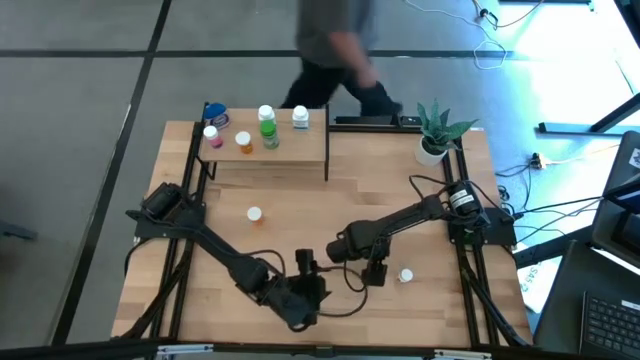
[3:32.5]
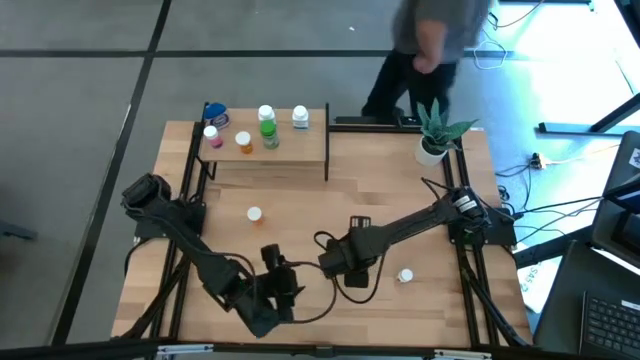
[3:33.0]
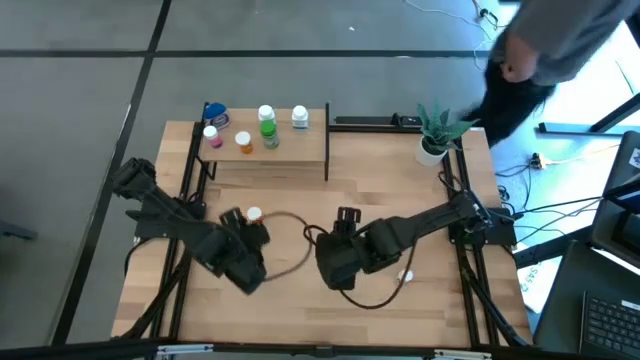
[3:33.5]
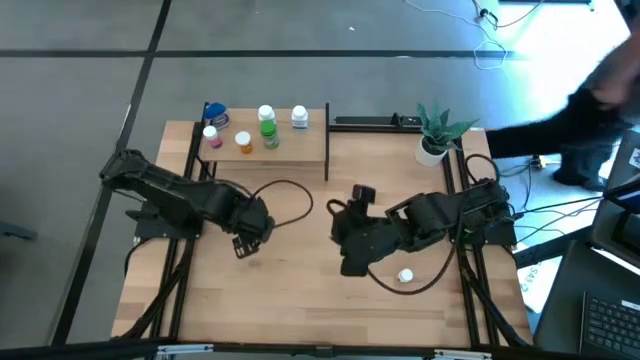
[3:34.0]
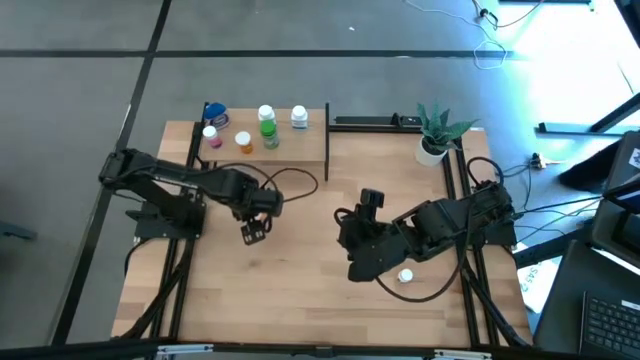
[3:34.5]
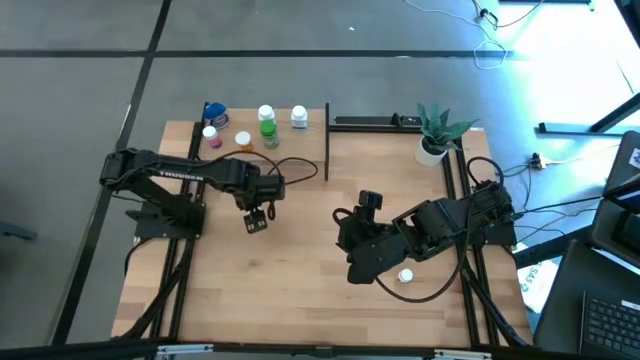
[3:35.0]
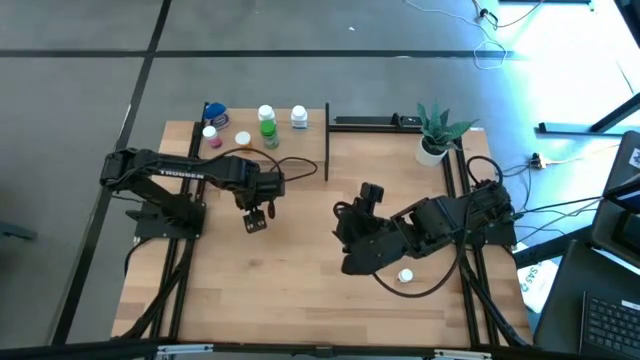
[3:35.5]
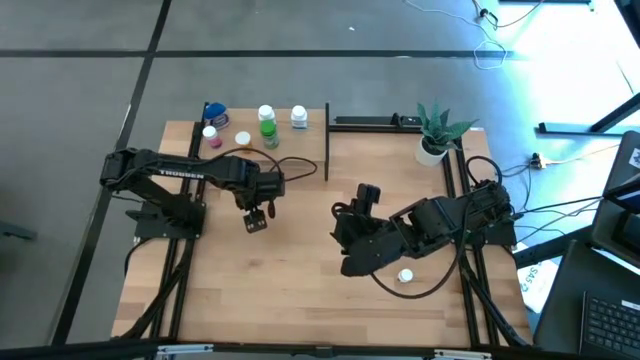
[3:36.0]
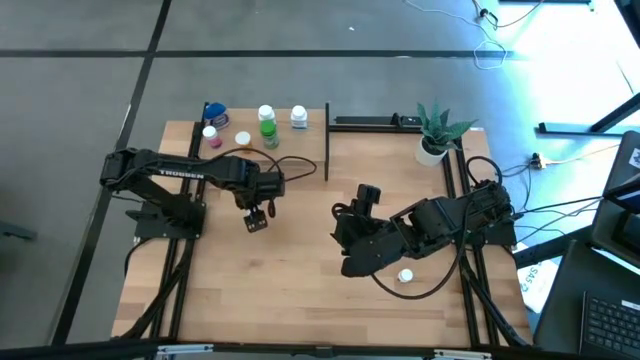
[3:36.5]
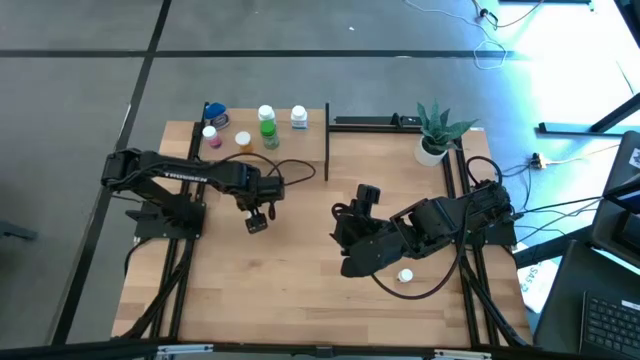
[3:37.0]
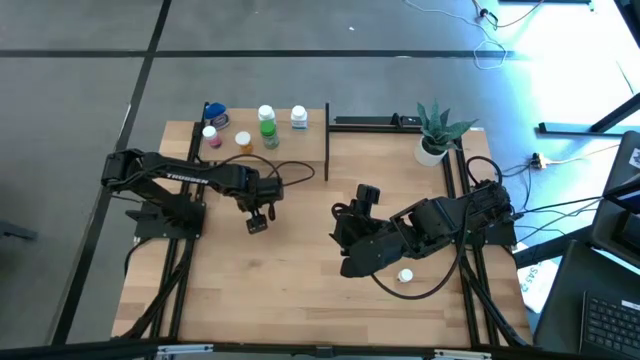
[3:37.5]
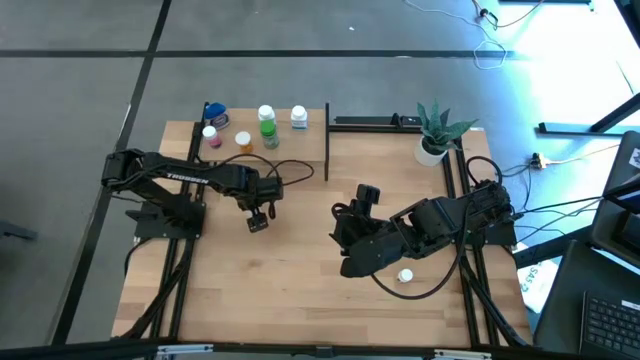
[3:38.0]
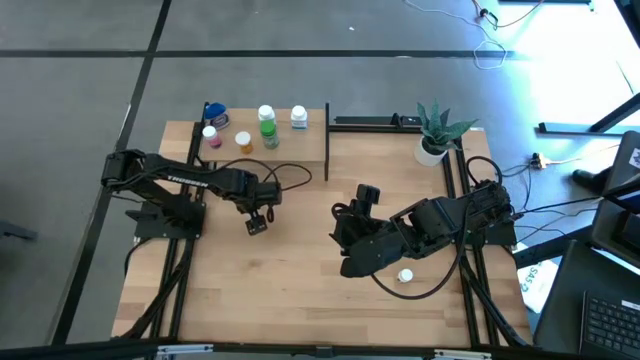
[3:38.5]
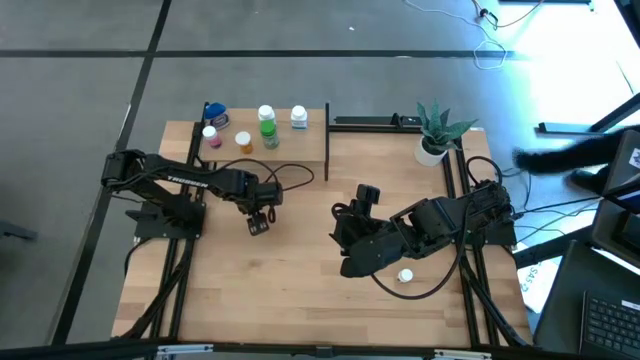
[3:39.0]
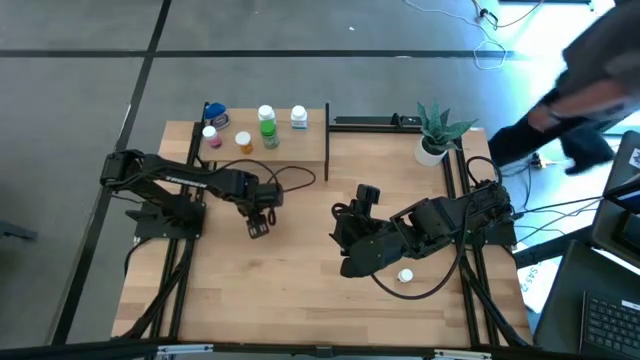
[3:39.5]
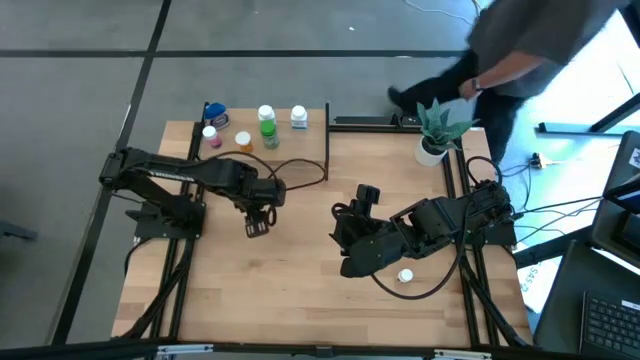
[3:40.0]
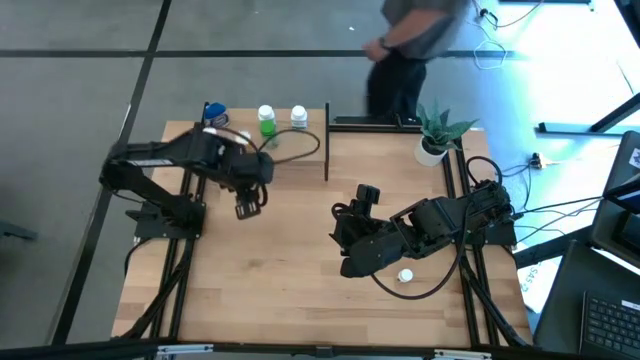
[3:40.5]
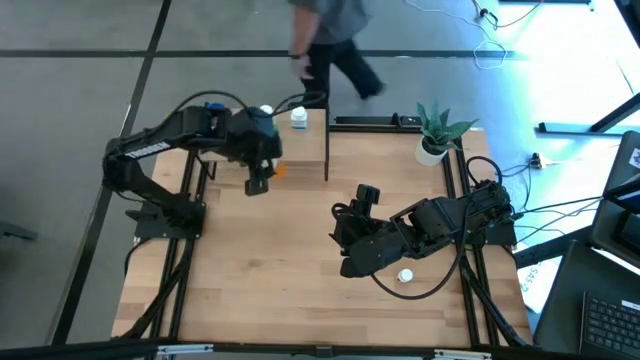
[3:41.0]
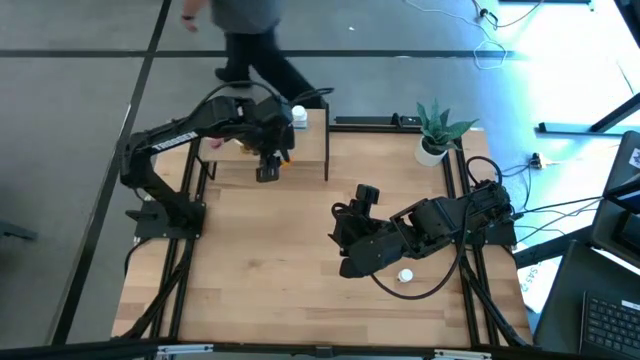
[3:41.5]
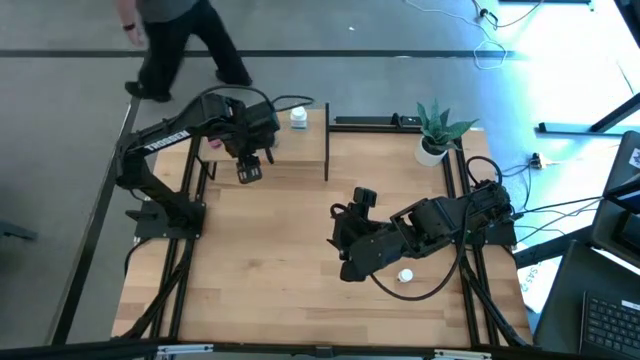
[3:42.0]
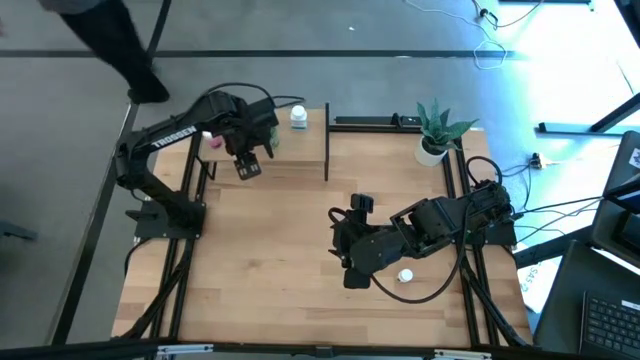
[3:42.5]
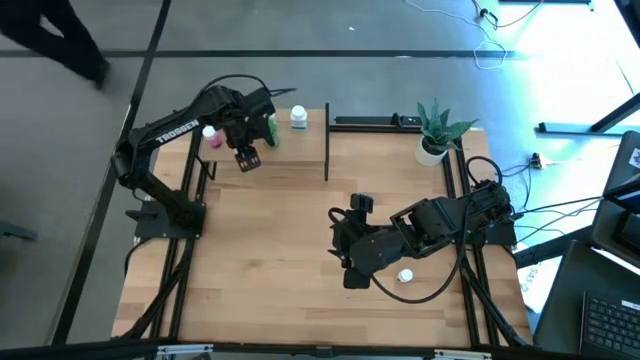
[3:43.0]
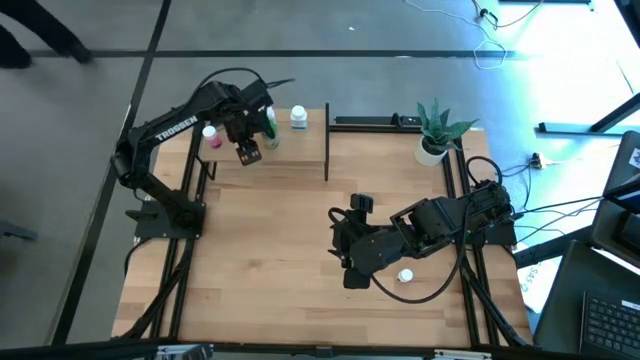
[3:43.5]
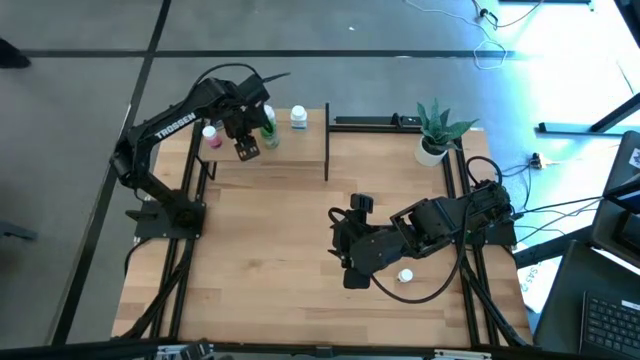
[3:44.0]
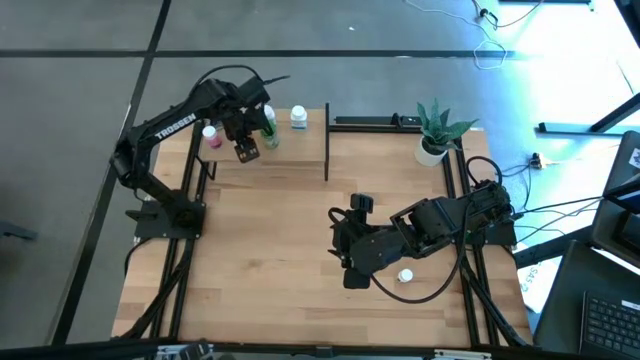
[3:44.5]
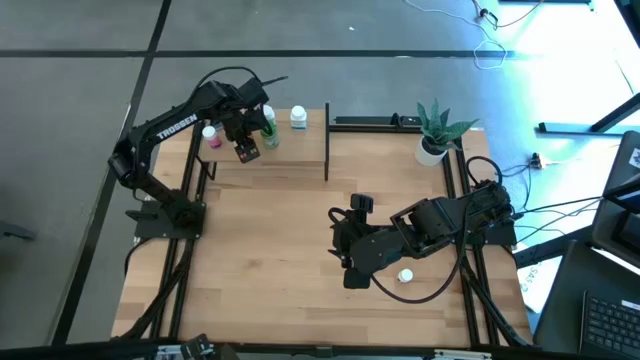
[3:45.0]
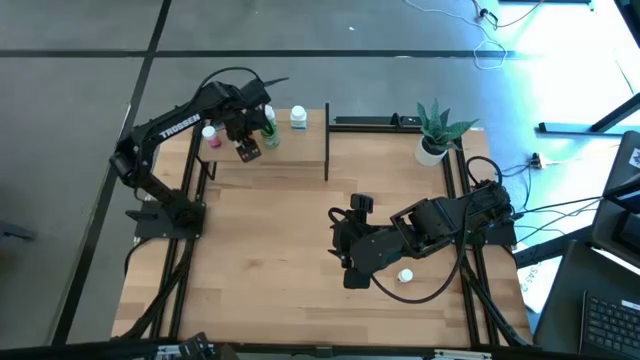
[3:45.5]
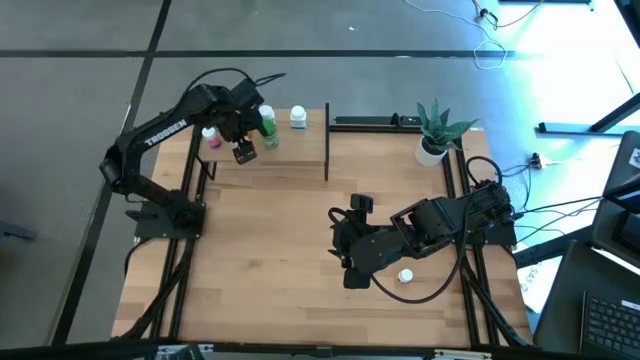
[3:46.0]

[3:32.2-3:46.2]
Task: Pick and place medicine bottles onto shelf by color
Put the orange pill bottle on the shelf

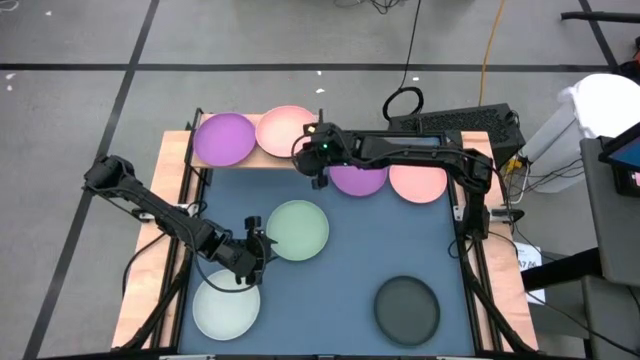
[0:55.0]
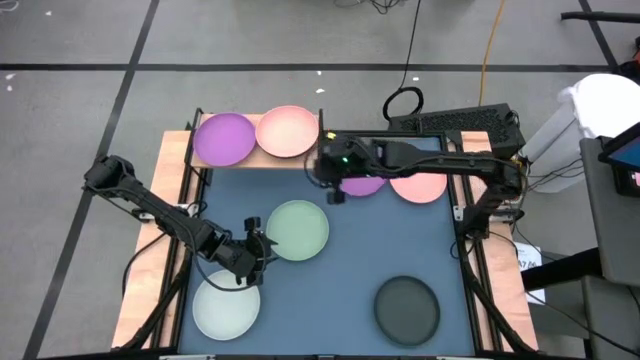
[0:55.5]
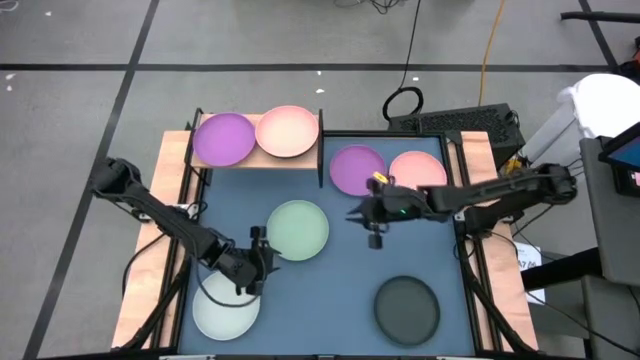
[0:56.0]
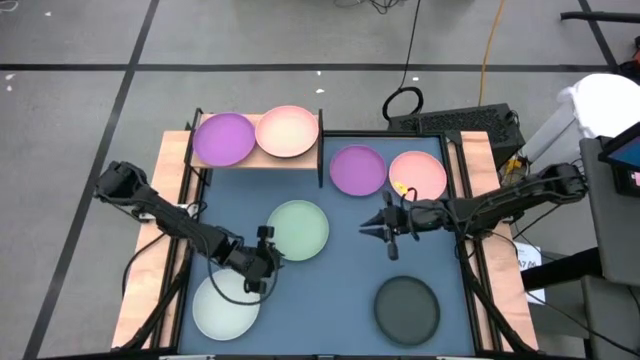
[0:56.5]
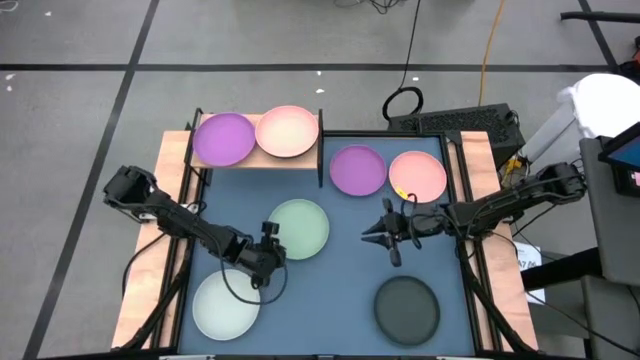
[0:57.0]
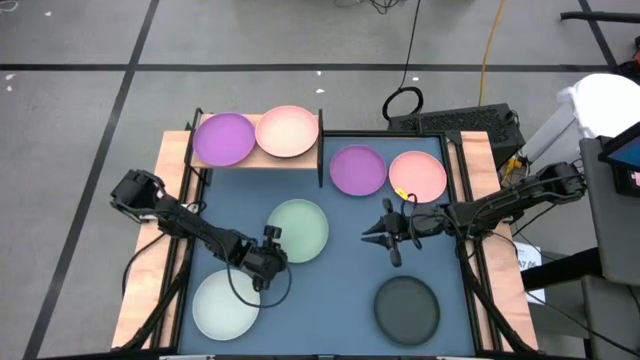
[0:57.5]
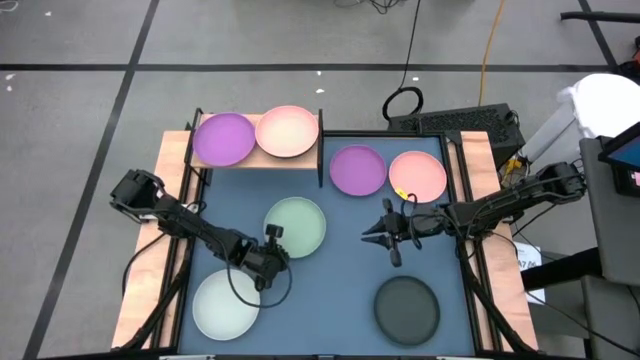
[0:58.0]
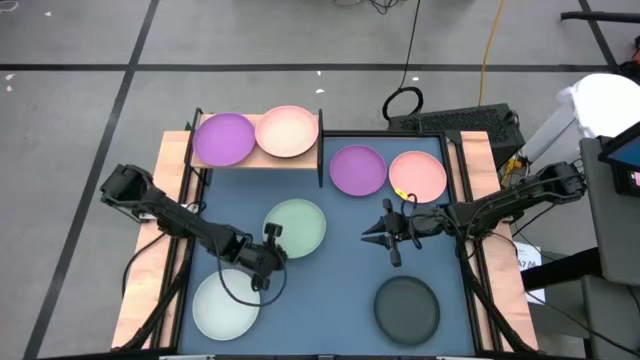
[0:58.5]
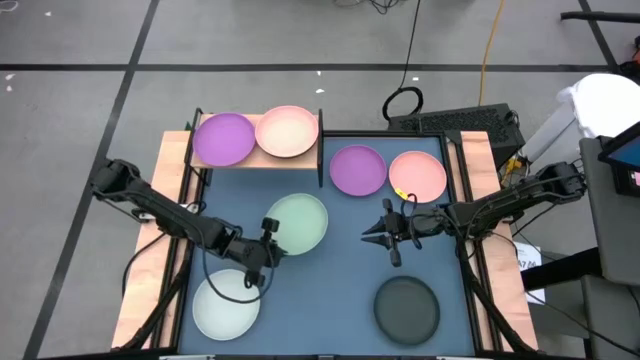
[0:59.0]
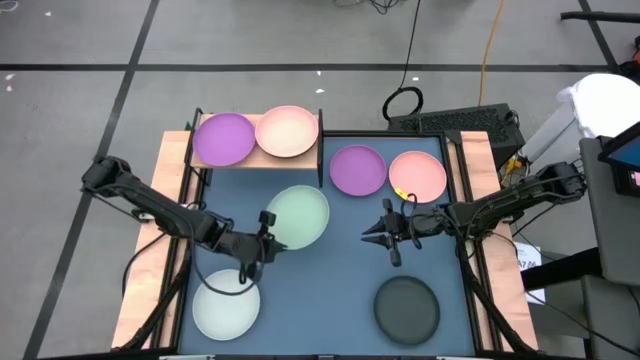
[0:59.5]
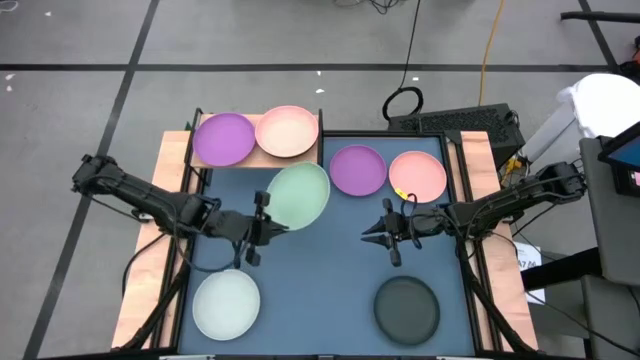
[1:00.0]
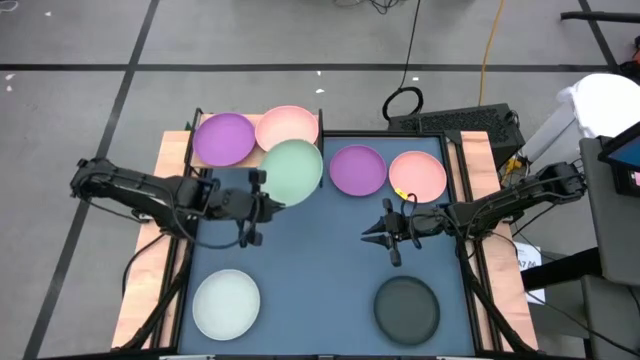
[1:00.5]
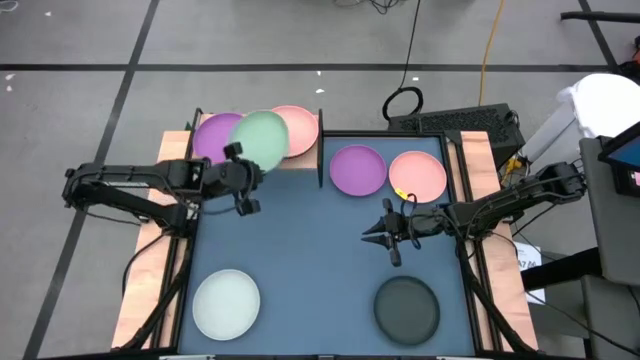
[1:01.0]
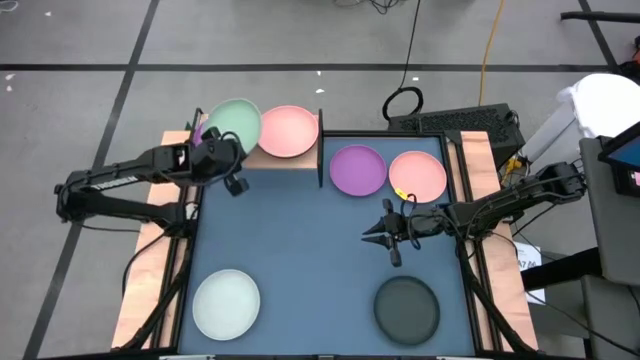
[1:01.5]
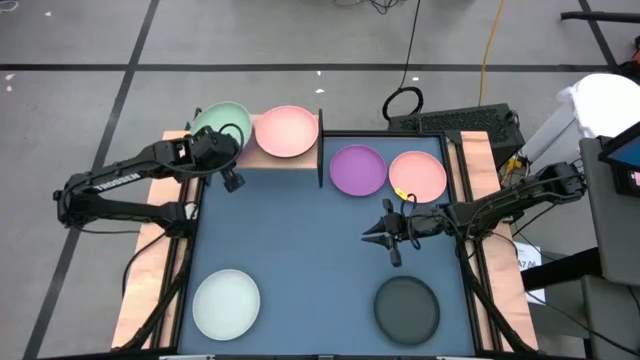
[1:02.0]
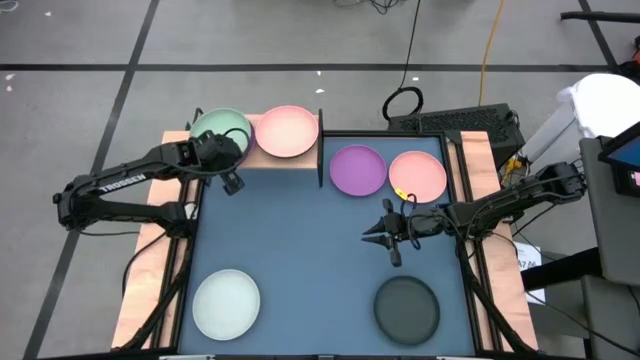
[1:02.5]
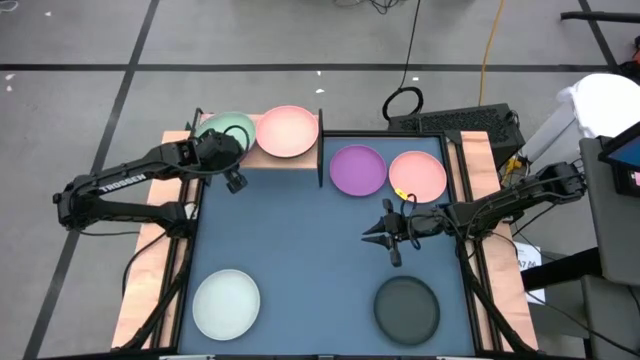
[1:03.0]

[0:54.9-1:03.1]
Task: Place and stack plates onto a shelf
Stack the light green plate on the purple plate on the shelf
